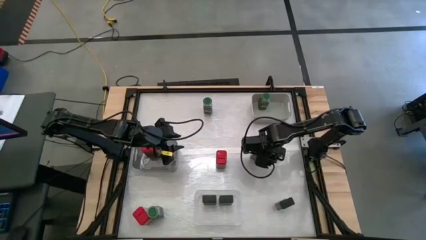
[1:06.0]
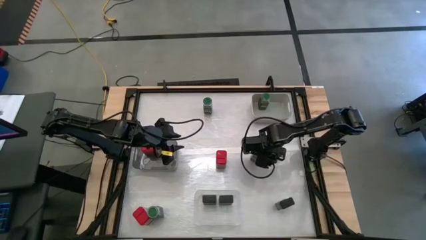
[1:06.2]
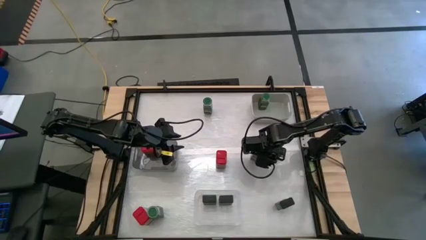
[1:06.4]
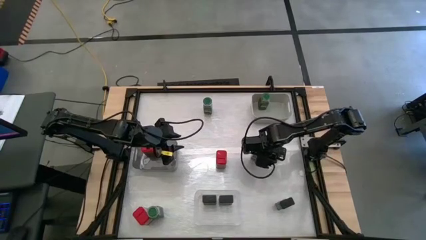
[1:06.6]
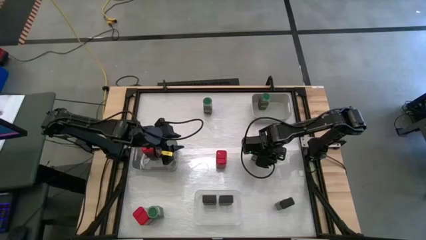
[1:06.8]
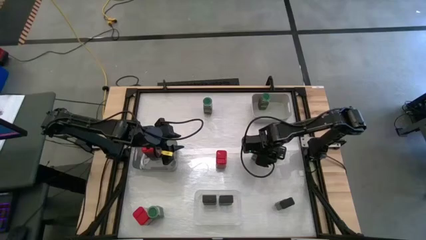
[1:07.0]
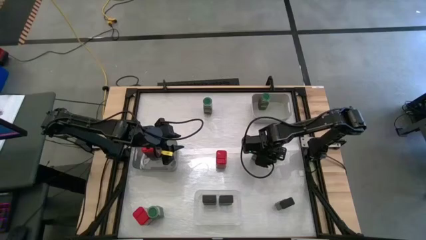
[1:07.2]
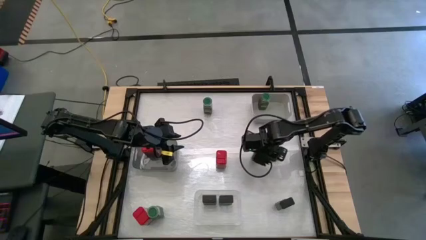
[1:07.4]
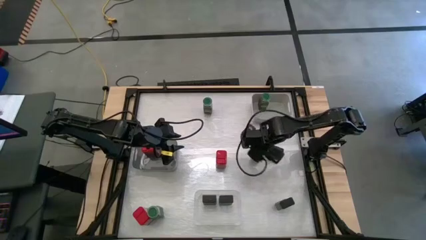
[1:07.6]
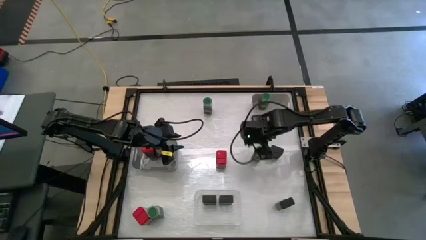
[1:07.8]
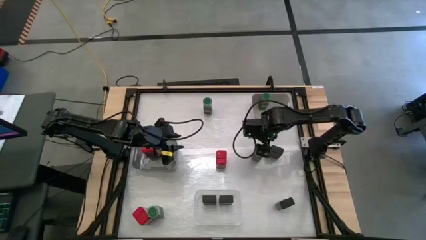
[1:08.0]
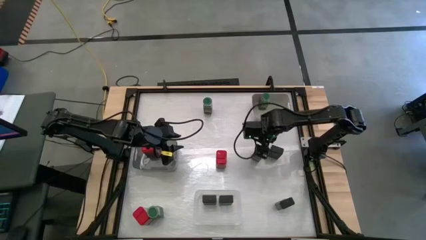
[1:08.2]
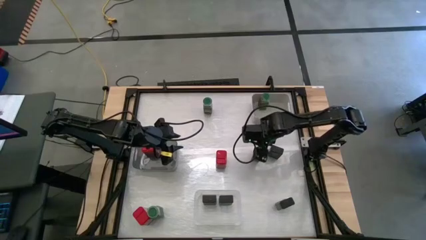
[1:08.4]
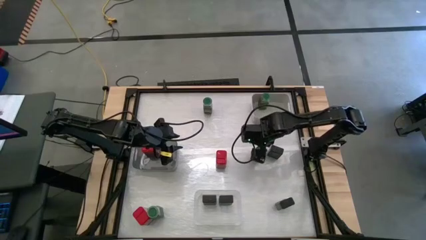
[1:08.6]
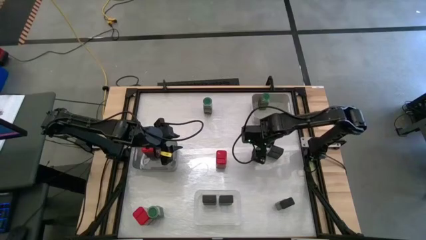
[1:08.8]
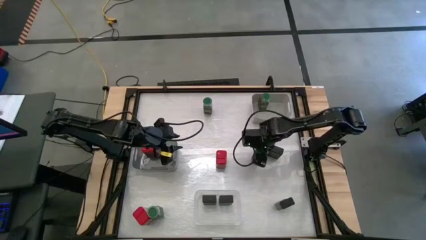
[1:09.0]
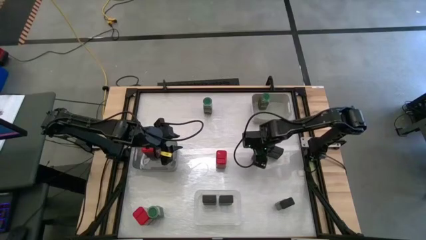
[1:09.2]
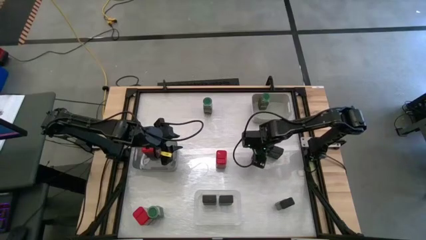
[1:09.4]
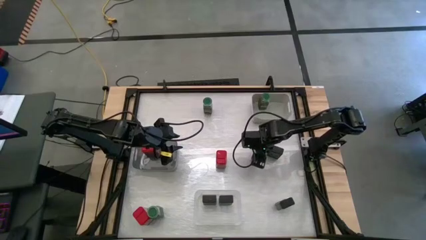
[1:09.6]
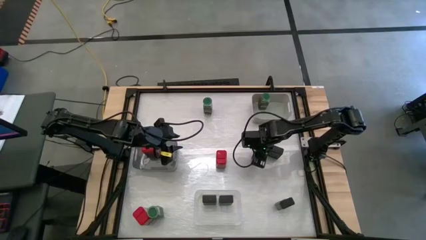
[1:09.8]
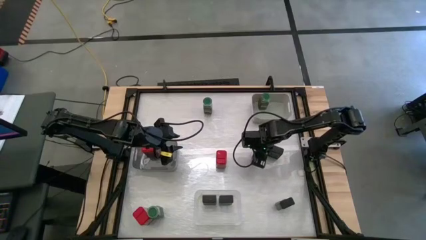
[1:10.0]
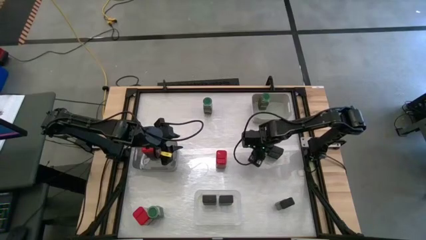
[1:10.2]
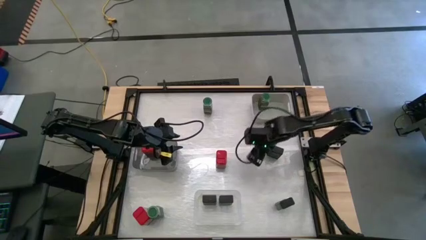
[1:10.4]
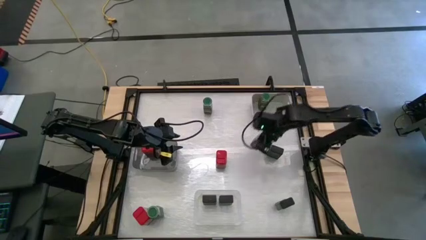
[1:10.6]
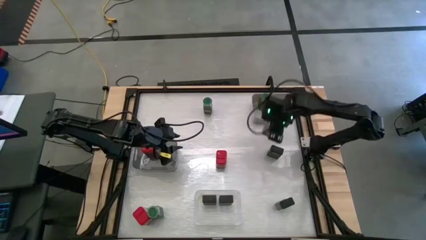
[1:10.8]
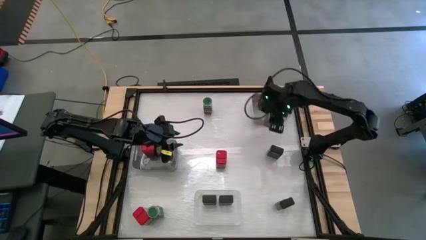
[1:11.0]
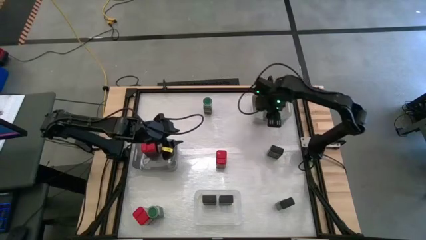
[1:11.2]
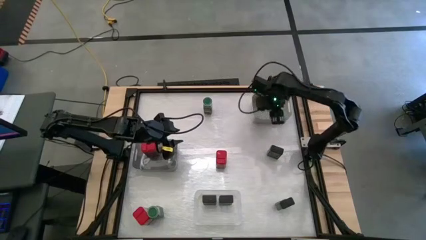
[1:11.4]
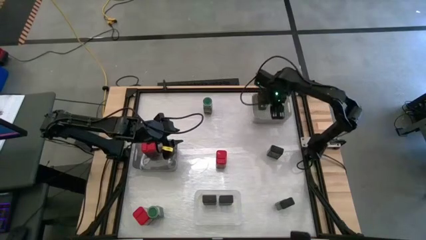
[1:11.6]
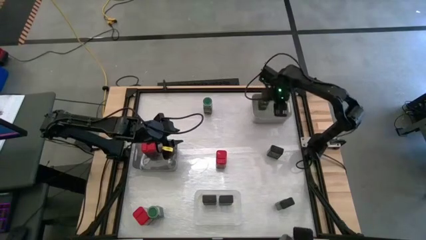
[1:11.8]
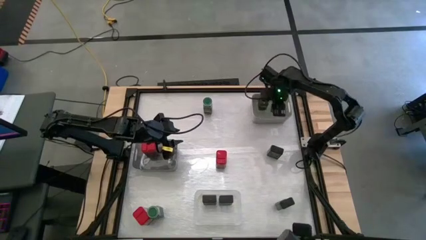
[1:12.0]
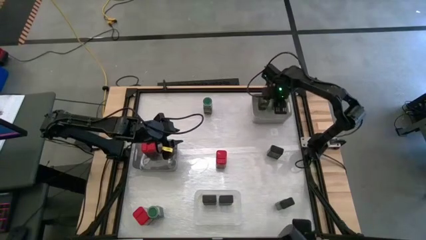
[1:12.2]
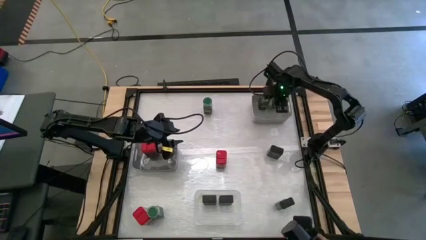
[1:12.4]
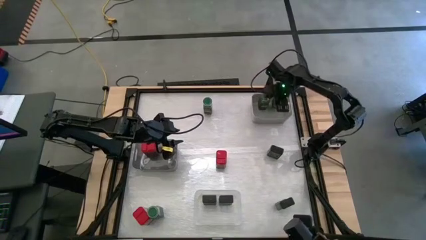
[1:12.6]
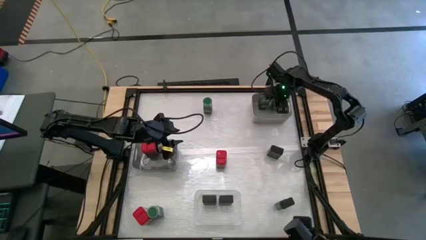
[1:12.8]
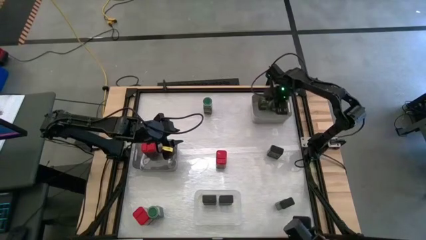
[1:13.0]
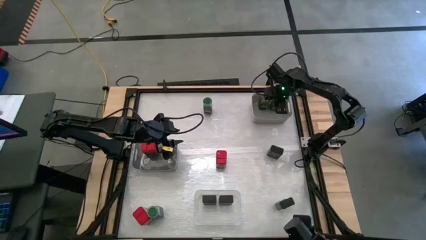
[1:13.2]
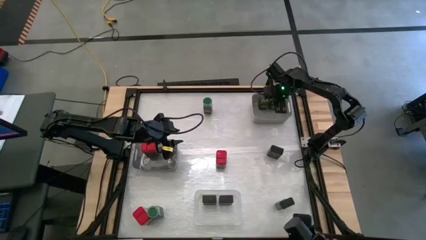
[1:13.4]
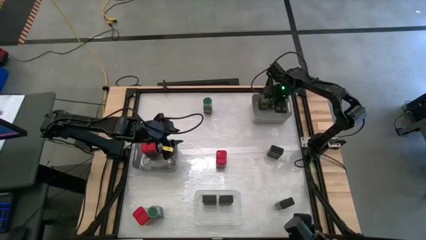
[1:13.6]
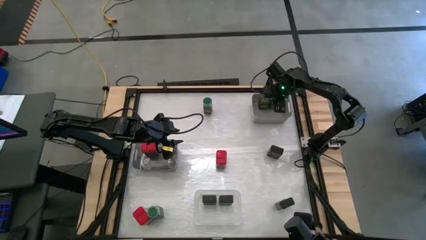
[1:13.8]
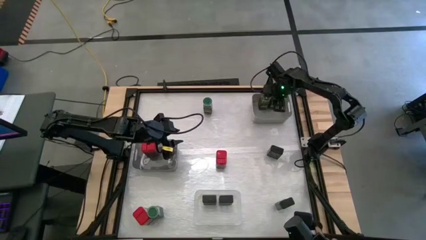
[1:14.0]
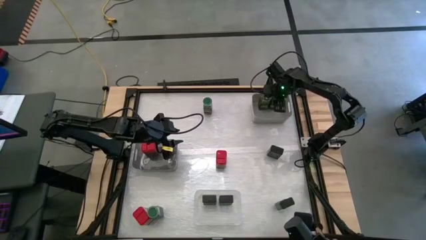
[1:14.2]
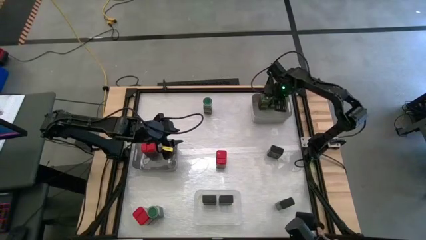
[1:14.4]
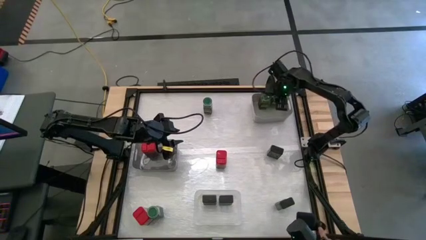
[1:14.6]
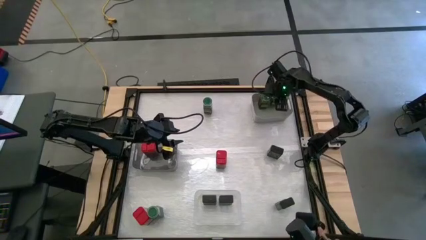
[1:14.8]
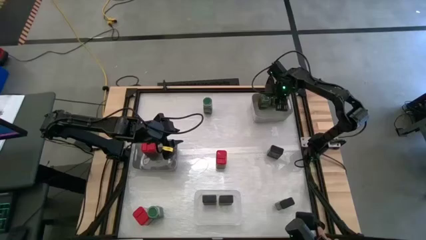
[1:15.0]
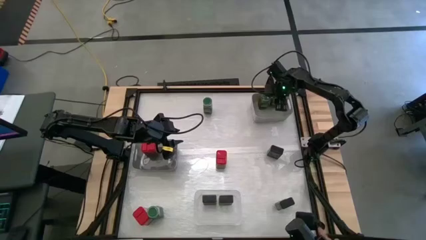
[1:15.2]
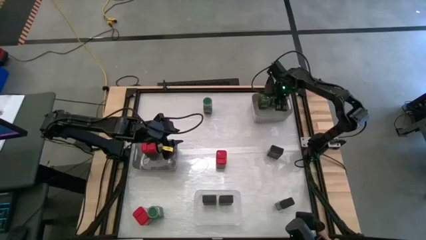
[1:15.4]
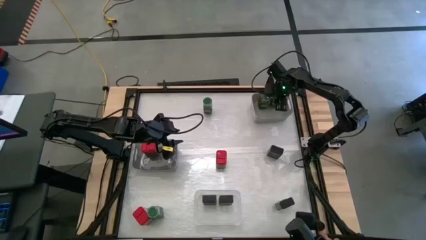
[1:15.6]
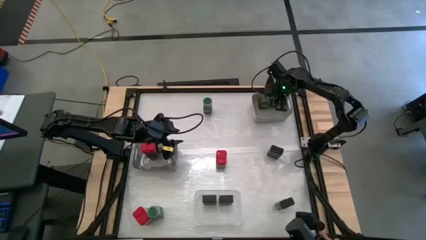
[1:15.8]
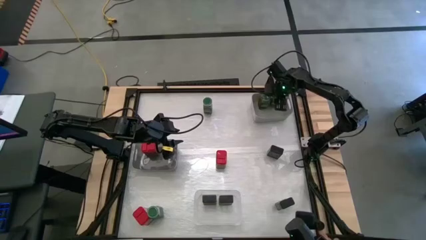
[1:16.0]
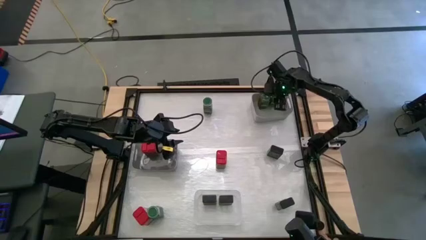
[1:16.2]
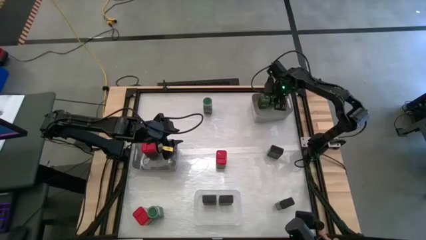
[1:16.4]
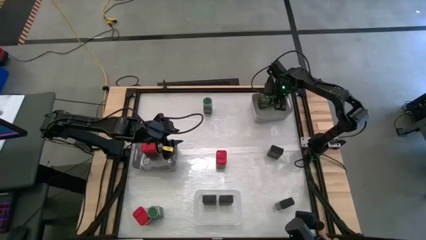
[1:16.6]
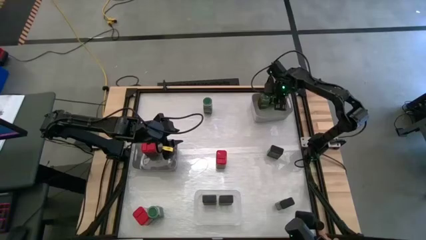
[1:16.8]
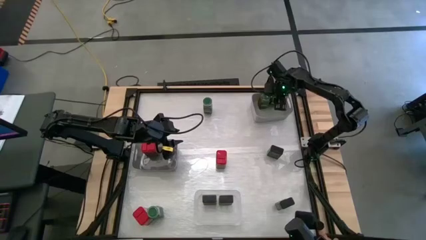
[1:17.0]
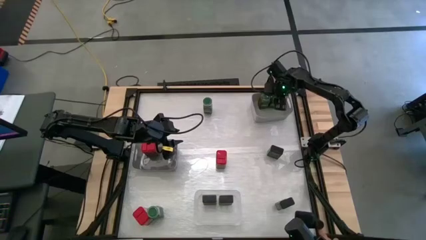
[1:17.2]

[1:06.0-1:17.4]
Task: Sort spices by type
Put the bottom right green seasoning bottle into the grey bin

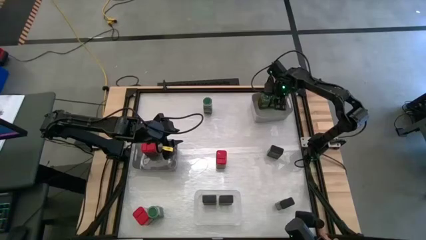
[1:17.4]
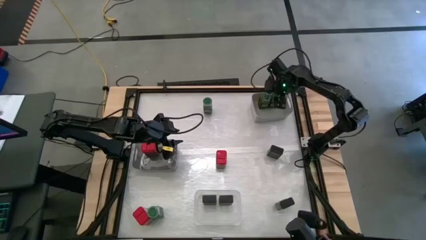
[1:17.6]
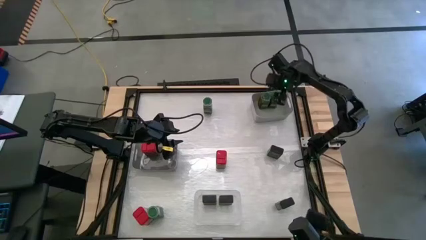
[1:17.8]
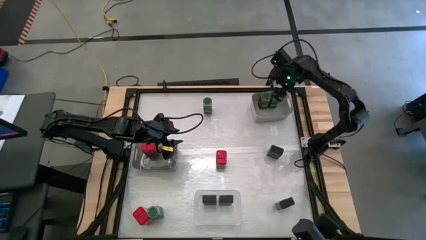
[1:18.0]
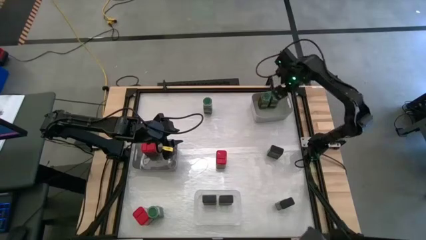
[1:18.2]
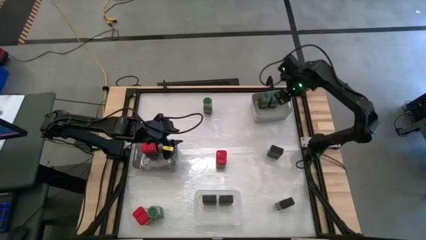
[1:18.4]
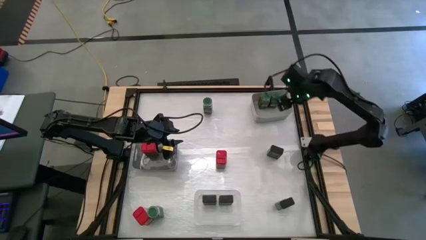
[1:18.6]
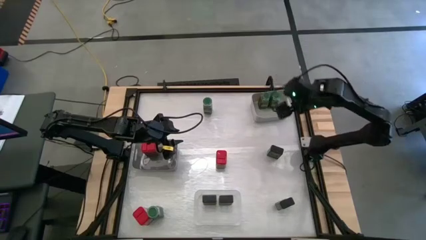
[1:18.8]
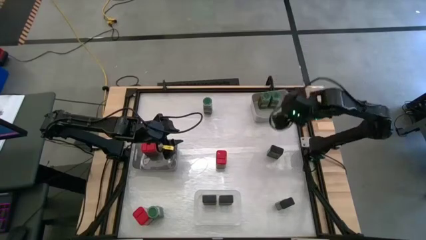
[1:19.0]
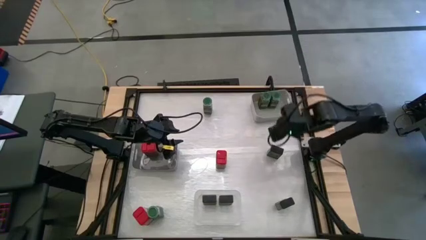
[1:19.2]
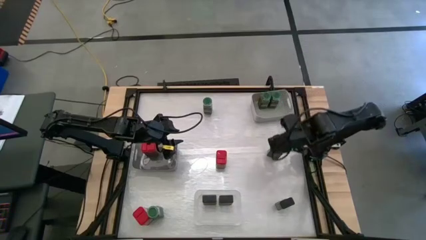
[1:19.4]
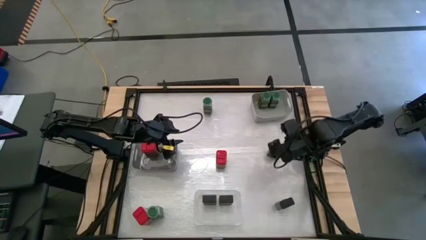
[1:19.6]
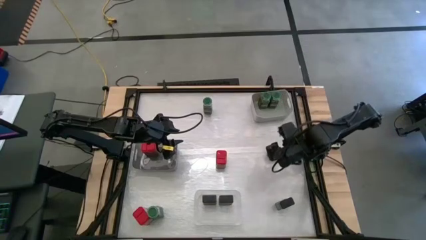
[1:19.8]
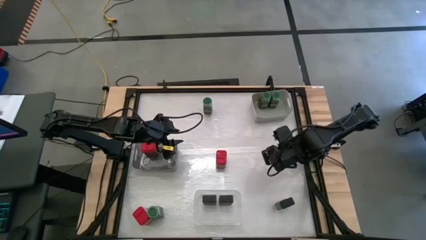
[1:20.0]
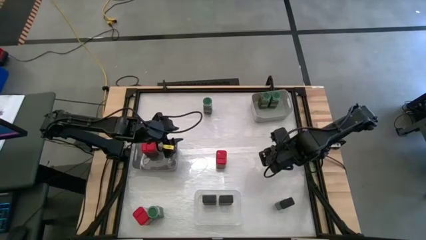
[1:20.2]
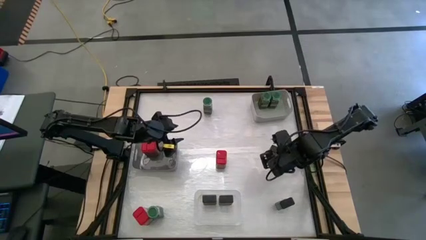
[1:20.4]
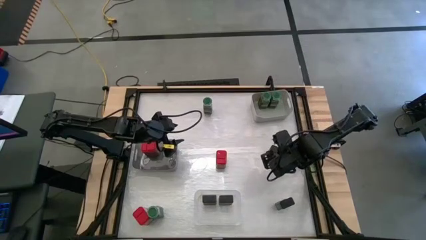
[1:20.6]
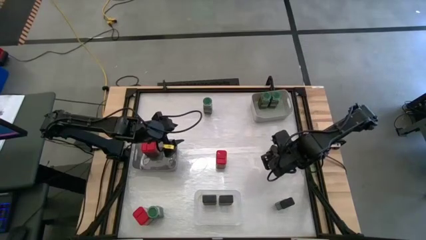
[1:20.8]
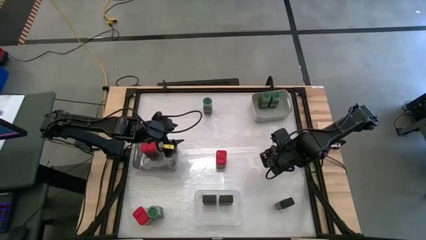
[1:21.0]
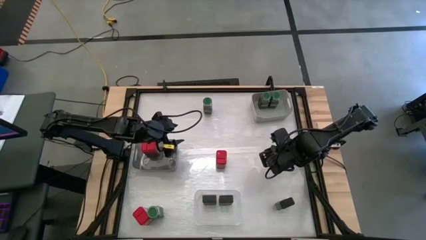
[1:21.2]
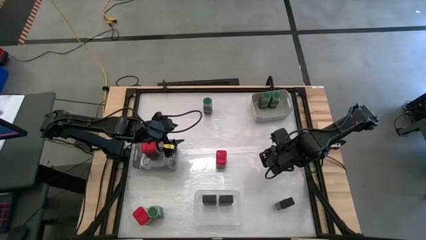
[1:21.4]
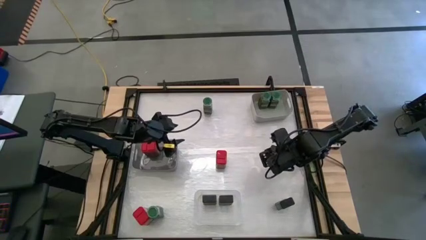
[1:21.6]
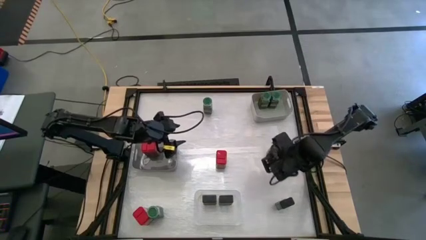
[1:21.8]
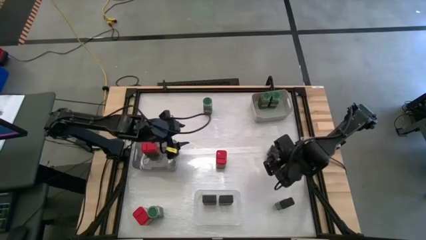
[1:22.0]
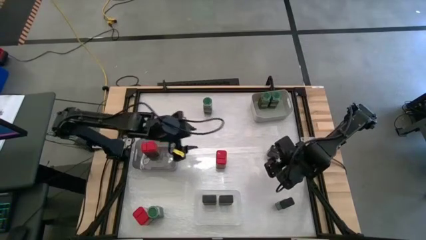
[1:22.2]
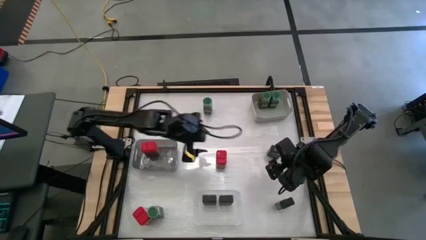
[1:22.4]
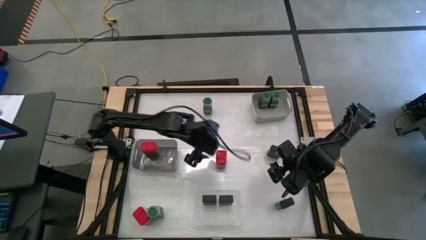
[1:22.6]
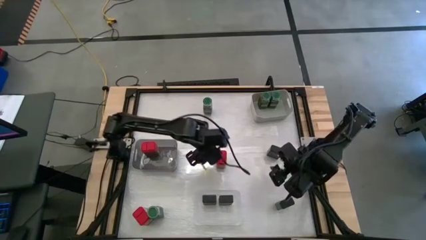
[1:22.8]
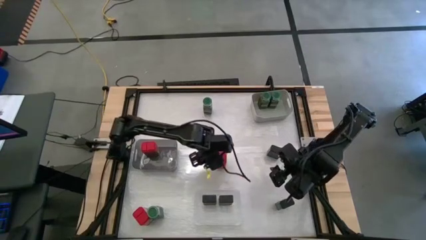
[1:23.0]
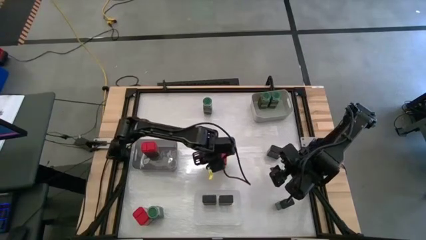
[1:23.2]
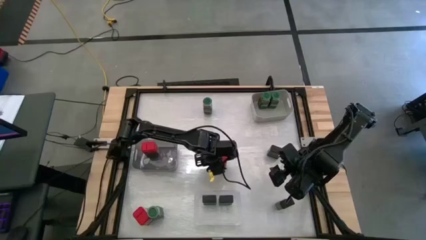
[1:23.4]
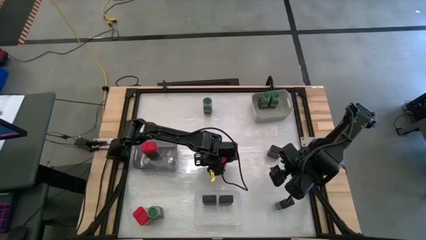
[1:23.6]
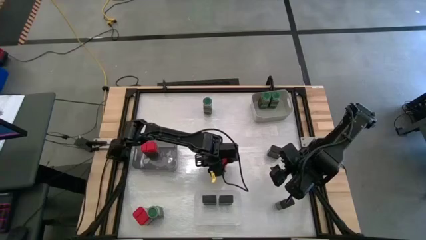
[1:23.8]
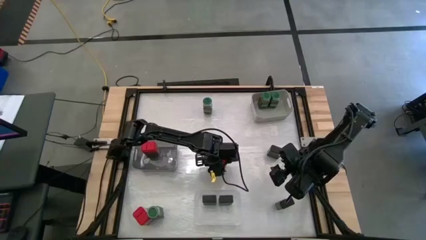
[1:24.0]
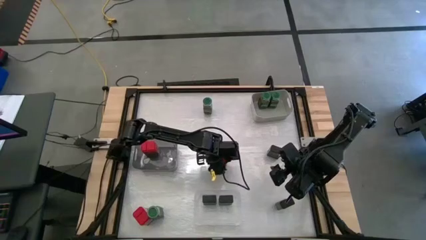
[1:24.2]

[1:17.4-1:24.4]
Put the right red seasoning can into the black bin
